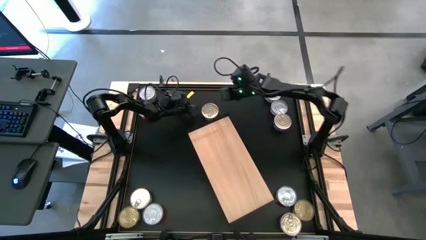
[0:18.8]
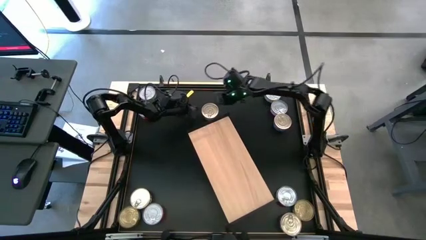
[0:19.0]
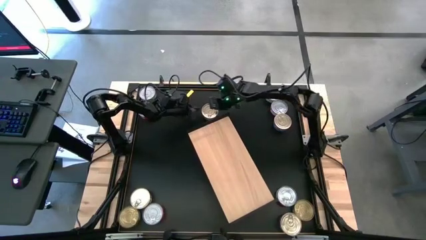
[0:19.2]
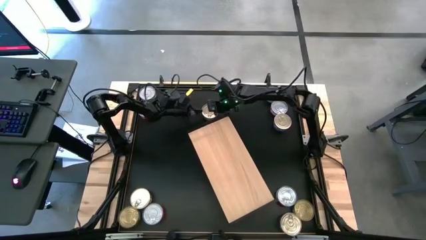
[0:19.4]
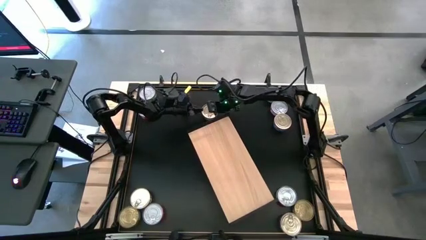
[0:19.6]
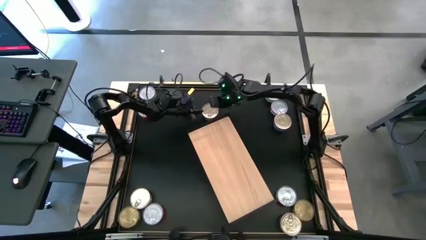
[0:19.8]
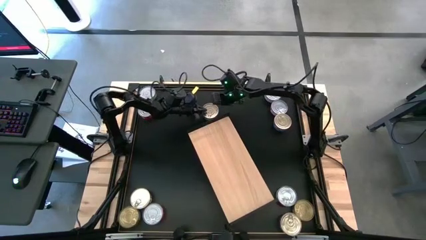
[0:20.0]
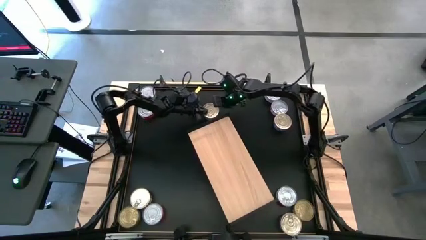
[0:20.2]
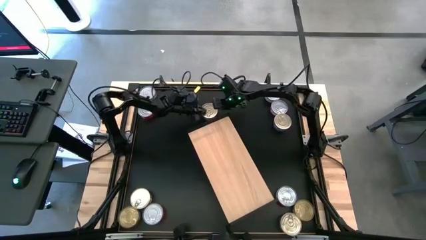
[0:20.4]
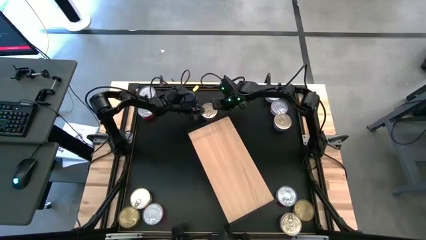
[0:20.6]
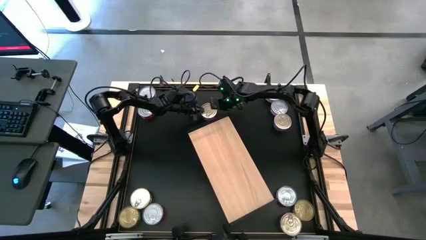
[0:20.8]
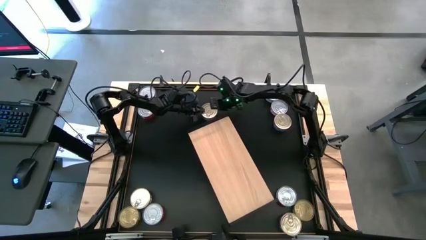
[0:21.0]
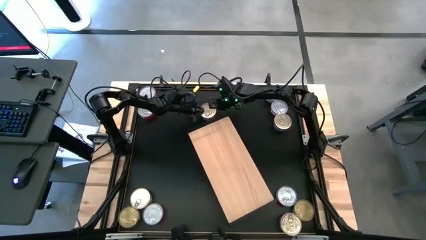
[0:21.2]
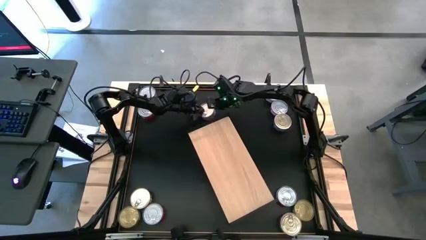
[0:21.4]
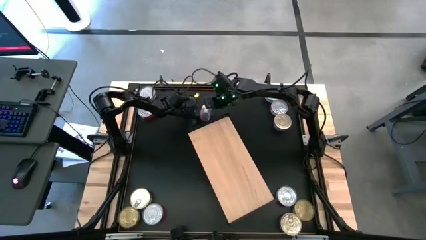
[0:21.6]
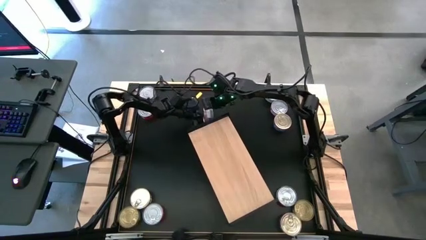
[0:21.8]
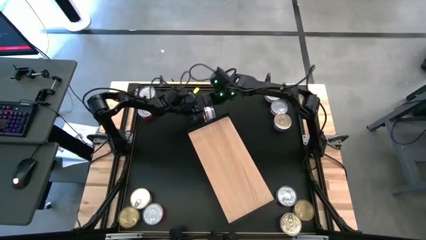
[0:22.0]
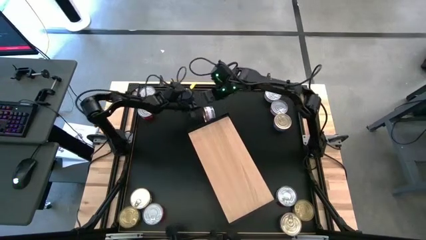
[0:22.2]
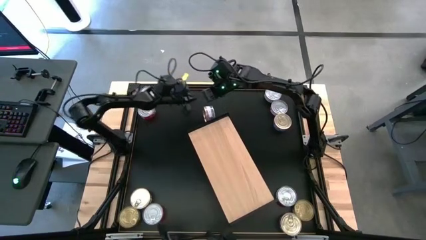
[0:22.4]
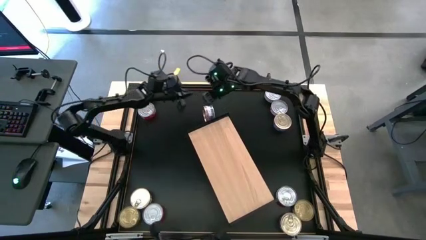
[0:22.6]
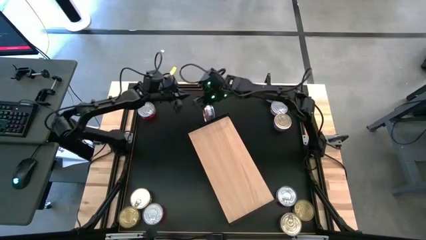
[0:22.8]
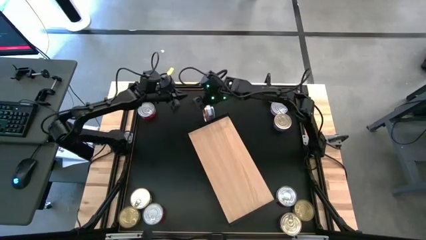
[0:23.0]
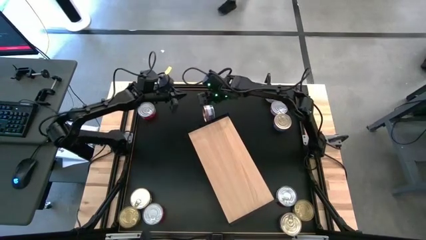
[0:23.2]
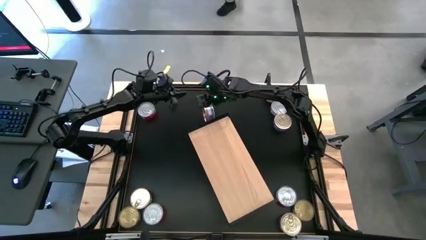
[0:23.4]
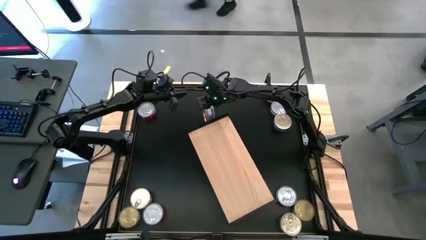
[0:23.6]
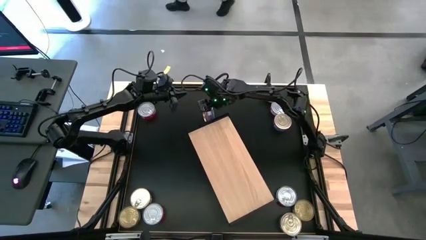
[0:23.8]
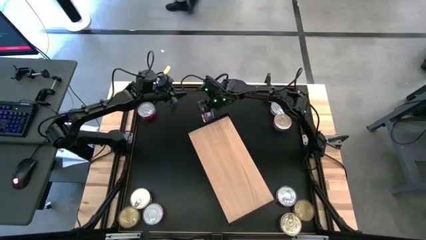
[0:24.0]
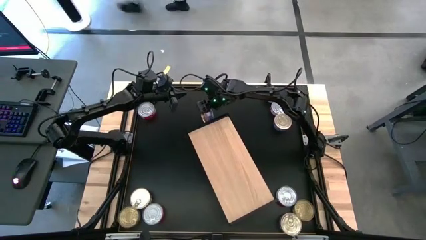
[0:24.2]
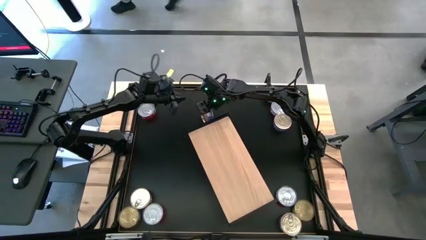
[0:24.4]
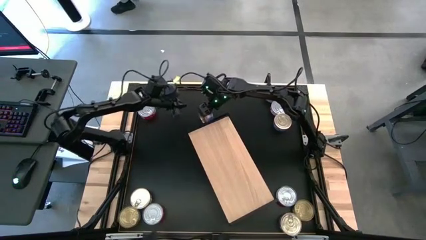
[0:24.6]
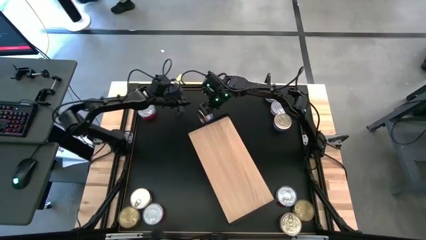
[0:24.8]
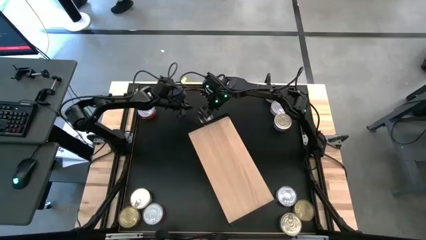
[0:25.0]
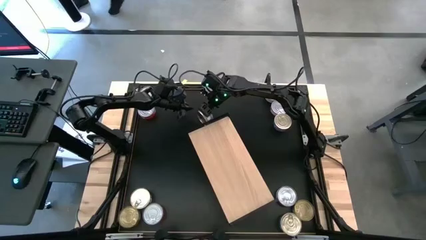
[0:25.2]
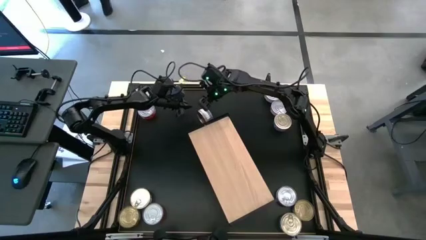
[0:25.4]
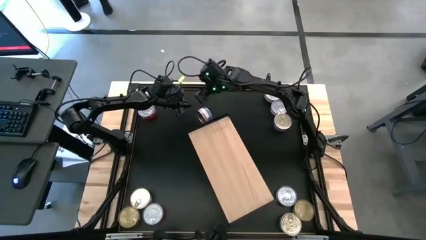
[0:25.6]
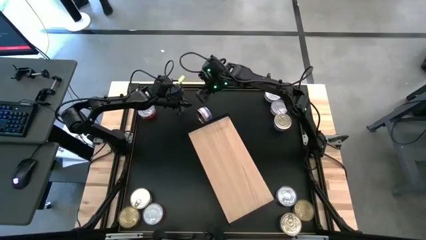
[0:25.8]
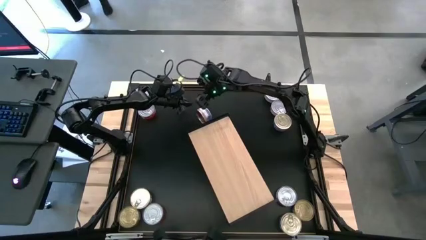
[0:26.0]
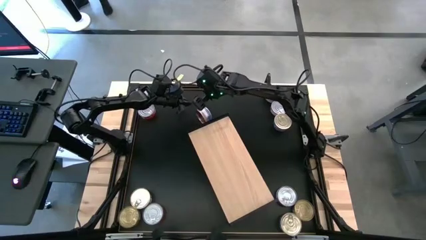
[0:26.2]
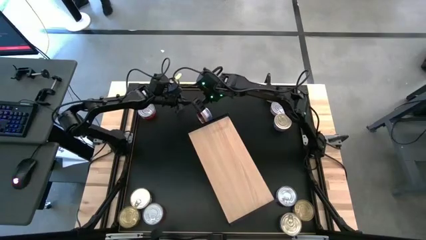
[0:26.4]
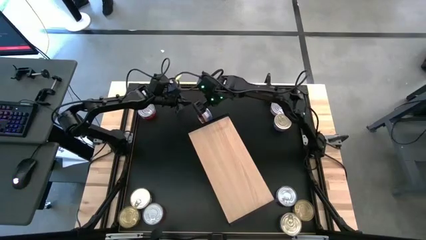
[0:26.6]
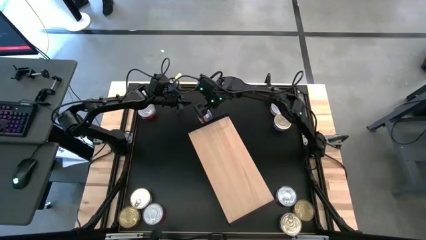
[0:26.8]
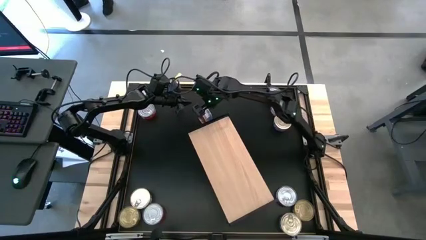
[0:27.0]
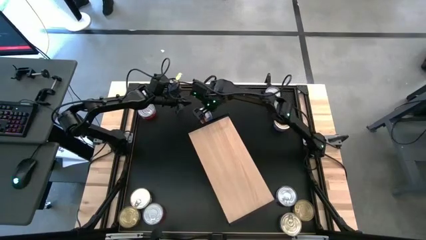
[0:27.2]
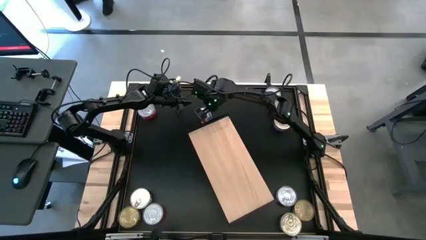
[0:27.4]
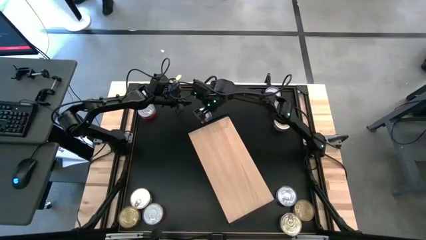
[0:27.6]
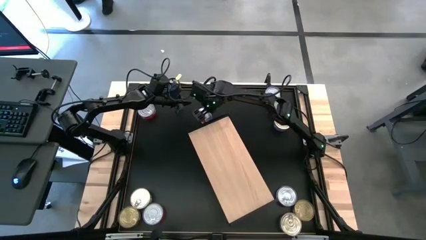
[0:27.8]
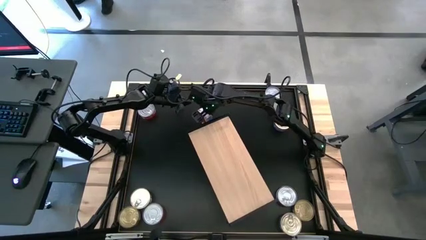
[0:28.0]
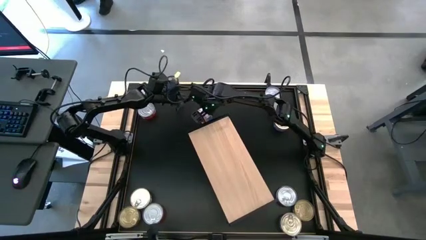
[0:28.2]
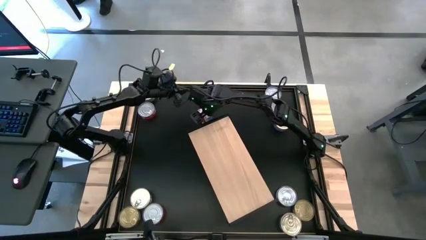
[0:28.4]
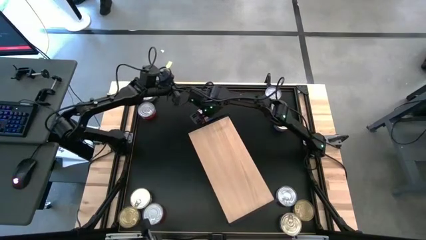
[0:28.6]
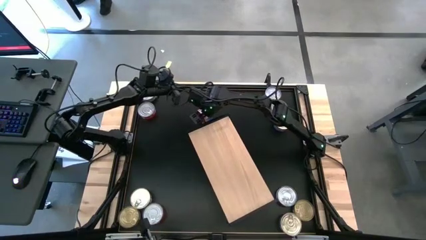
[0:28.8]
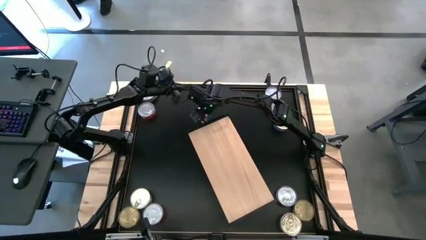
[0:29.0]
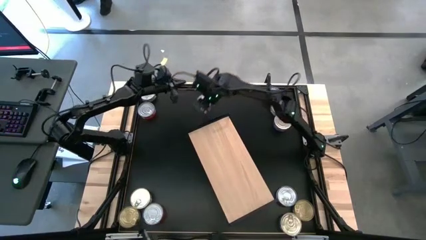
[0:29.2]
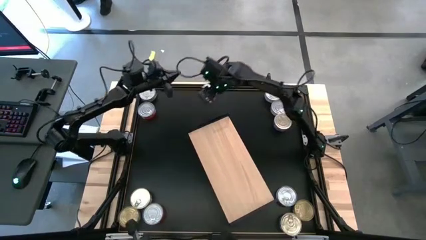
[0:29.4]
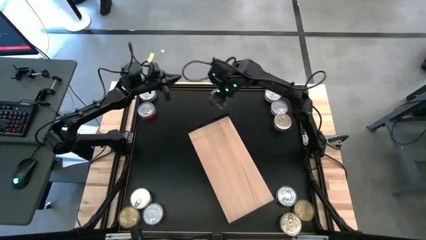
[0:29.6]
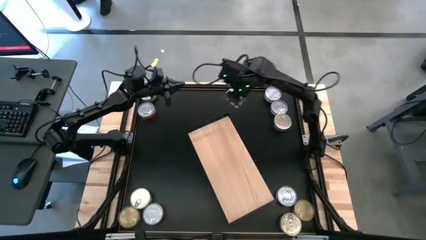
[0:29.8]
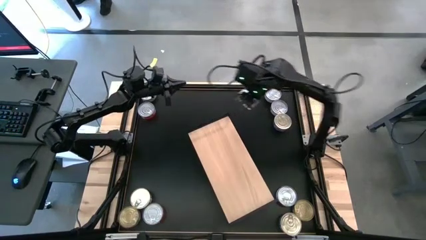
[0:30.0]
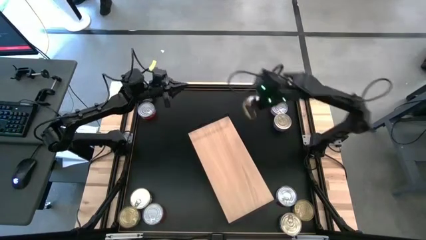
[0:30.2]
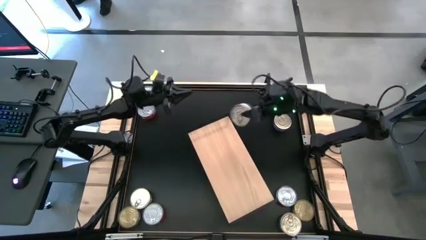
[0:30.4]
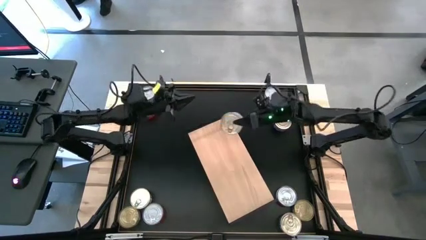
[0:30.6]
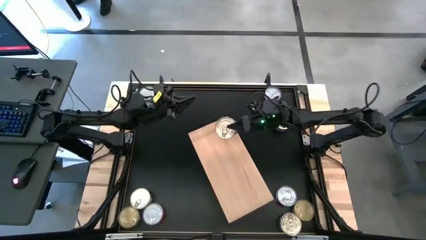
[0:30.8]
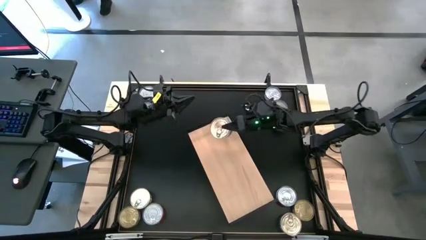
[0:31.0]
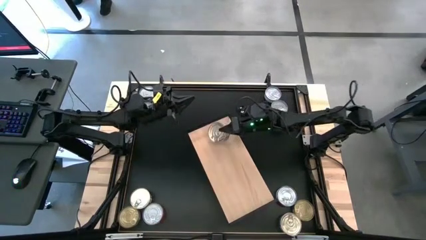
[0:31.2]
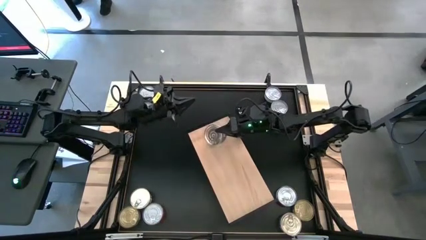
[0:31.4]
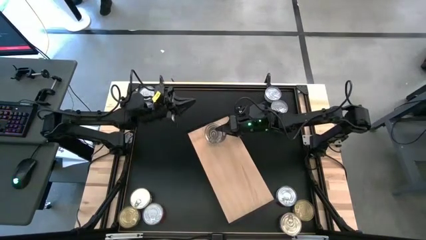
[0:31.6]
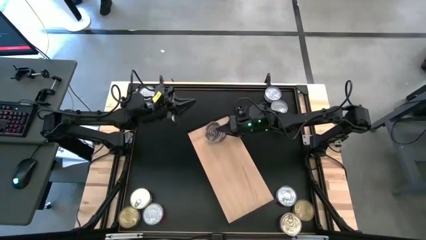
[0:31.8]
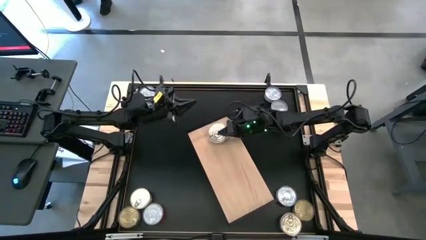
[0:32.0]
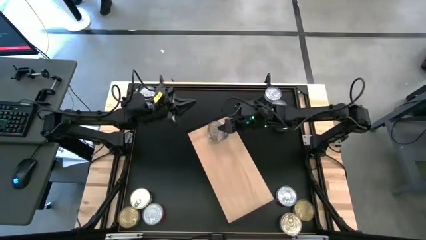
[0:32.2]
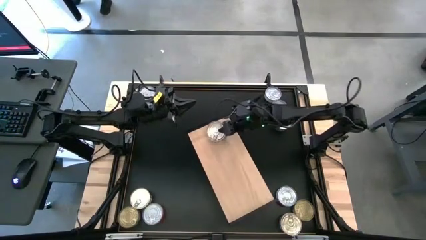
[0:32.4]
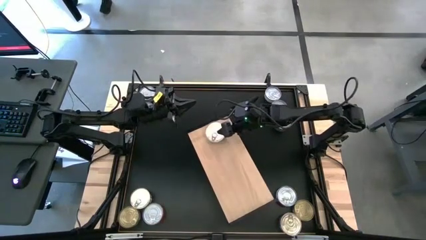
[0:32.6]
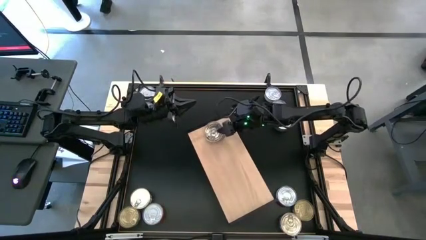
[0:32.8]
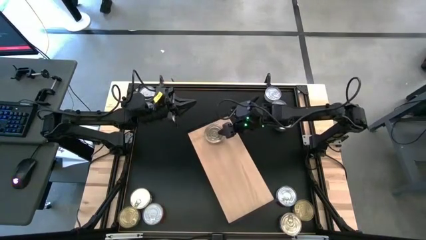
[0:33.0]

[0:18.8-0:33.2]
Task: Stack canned seafood by type on shelf
Put the blue tuna can on the shelf
